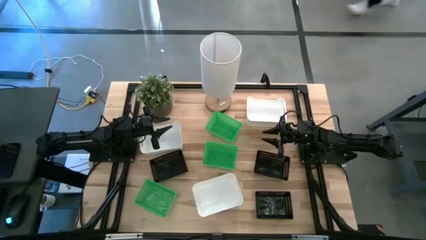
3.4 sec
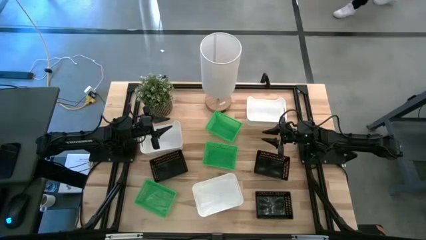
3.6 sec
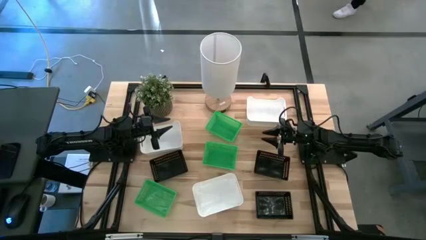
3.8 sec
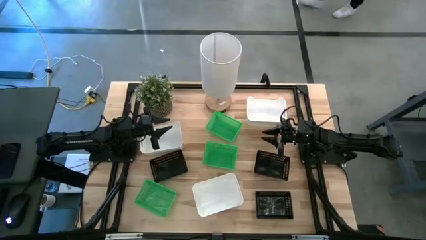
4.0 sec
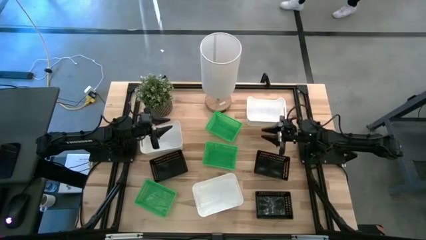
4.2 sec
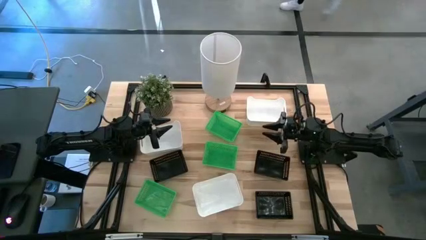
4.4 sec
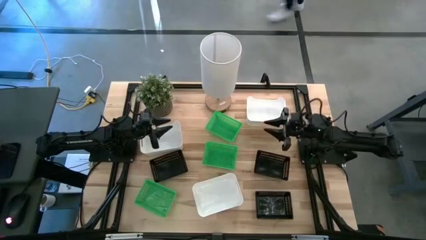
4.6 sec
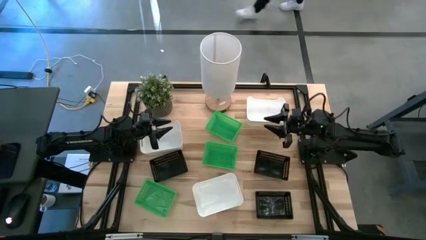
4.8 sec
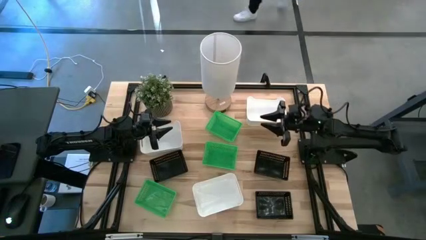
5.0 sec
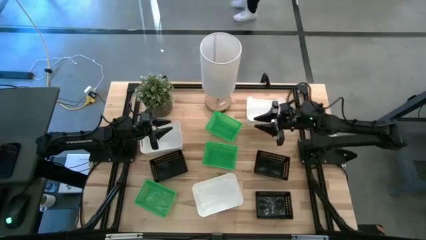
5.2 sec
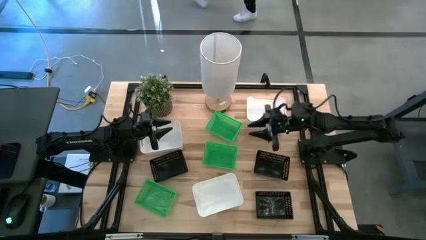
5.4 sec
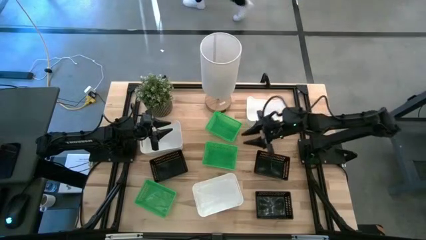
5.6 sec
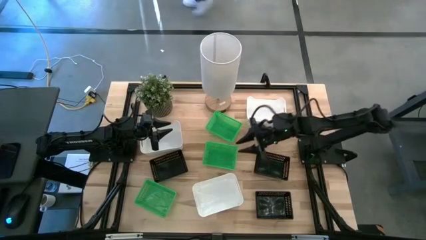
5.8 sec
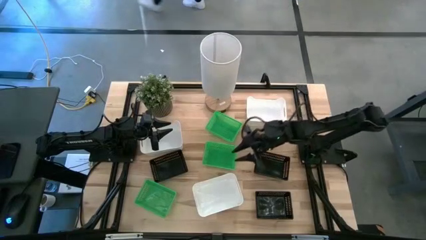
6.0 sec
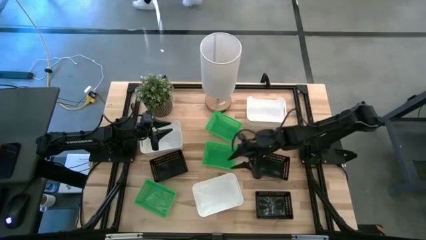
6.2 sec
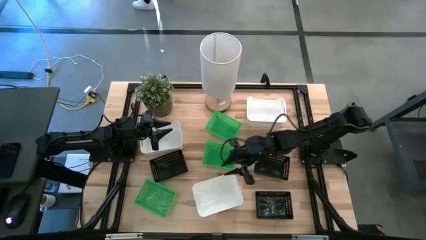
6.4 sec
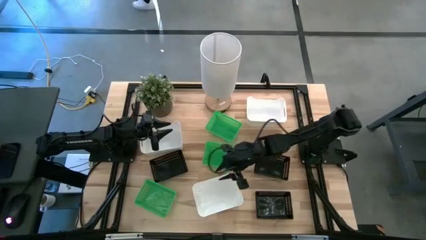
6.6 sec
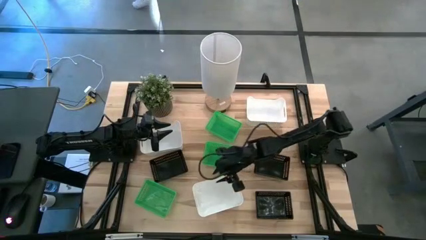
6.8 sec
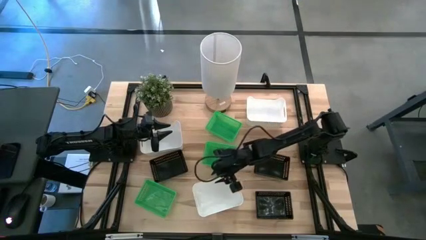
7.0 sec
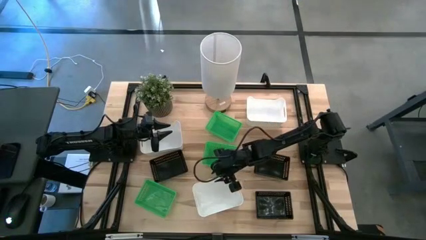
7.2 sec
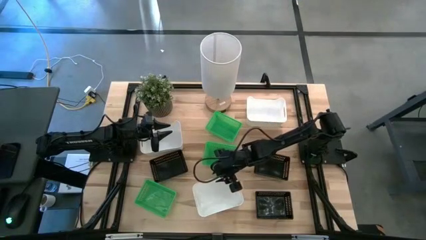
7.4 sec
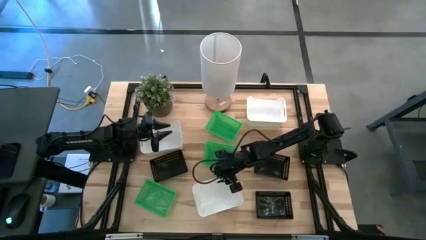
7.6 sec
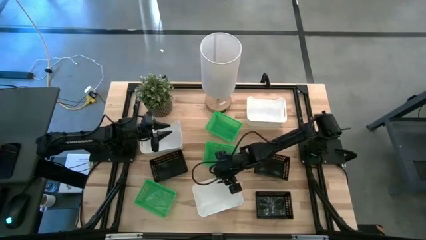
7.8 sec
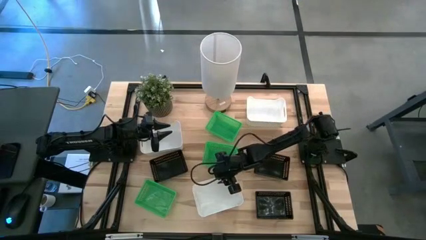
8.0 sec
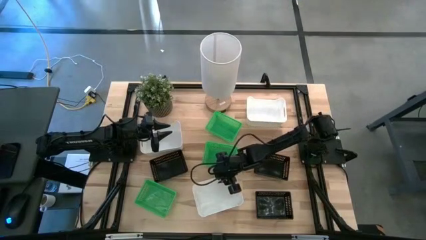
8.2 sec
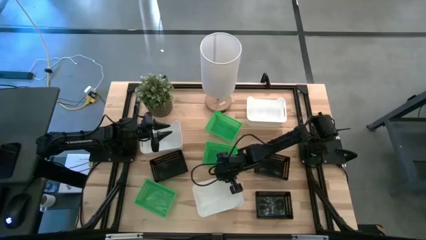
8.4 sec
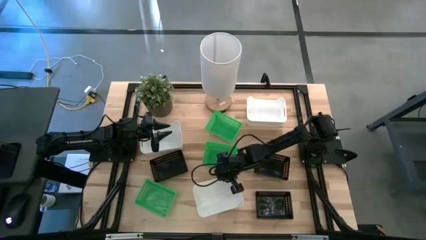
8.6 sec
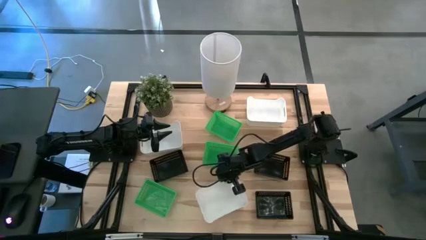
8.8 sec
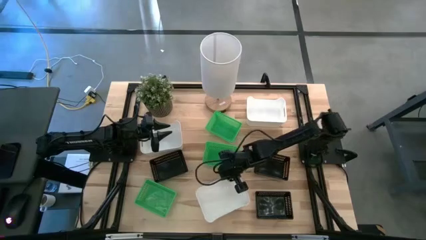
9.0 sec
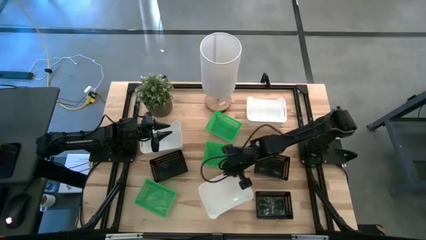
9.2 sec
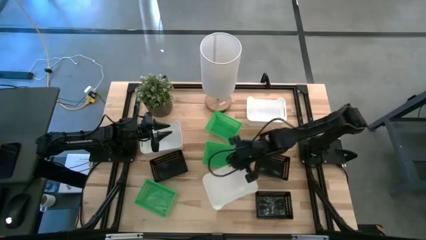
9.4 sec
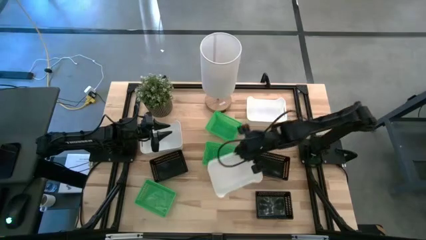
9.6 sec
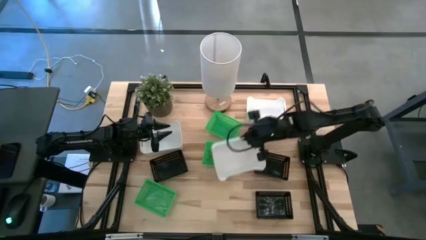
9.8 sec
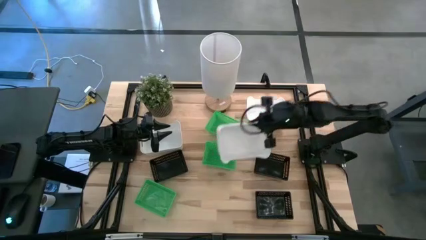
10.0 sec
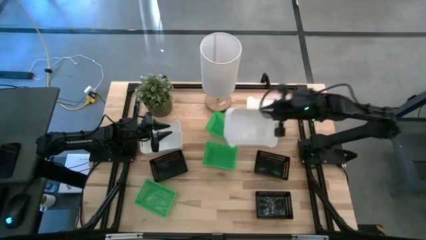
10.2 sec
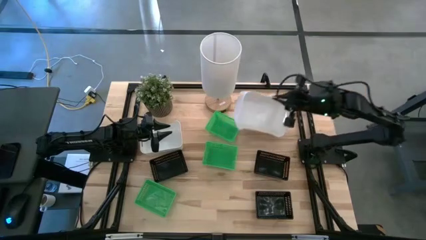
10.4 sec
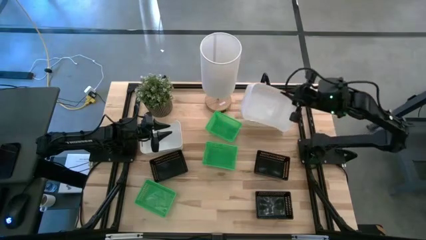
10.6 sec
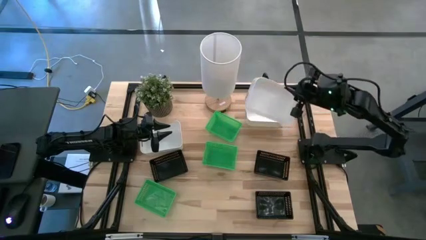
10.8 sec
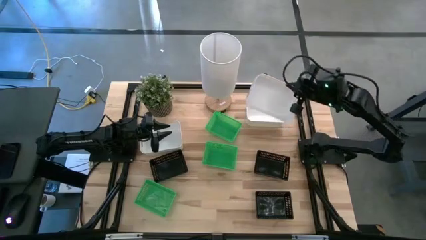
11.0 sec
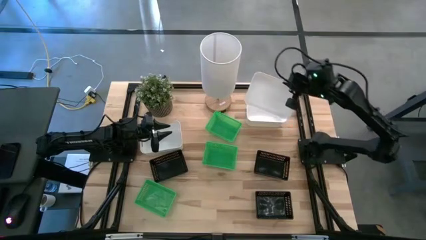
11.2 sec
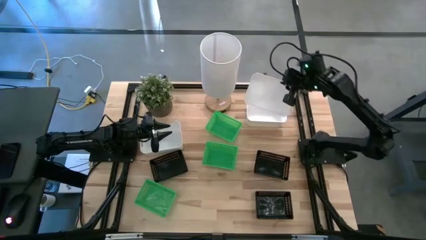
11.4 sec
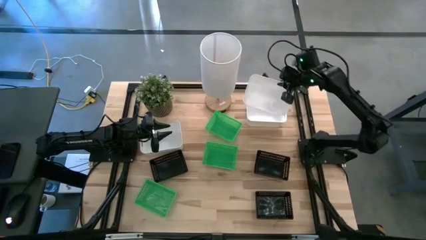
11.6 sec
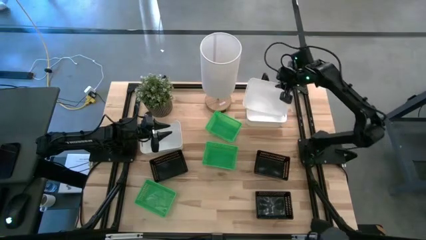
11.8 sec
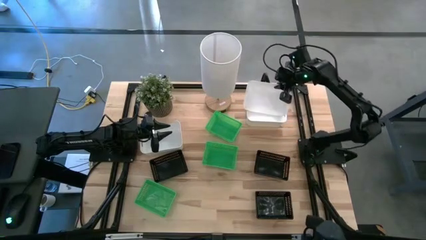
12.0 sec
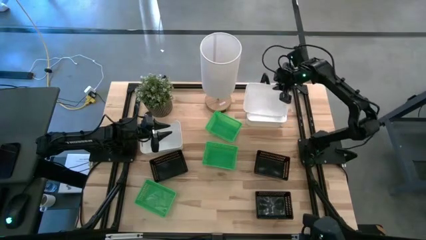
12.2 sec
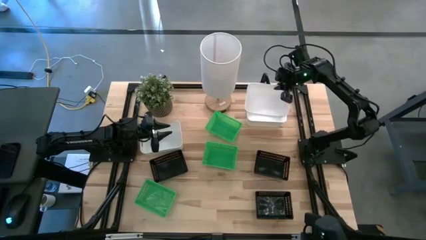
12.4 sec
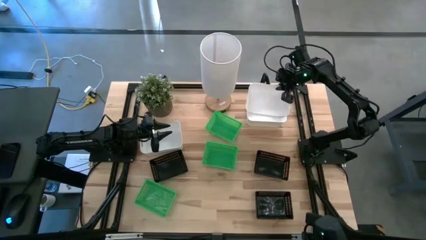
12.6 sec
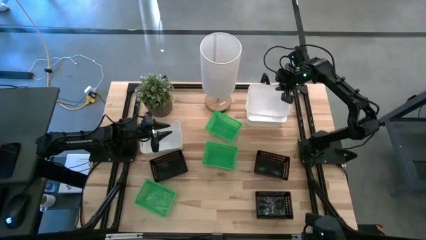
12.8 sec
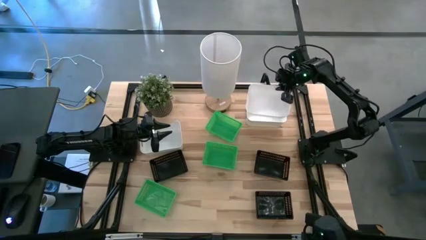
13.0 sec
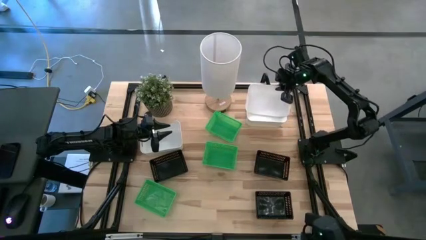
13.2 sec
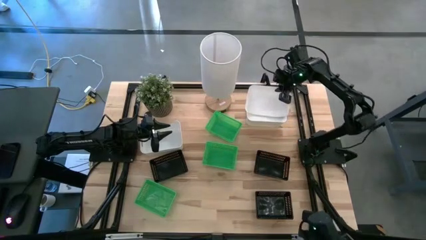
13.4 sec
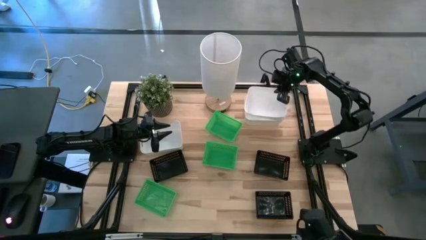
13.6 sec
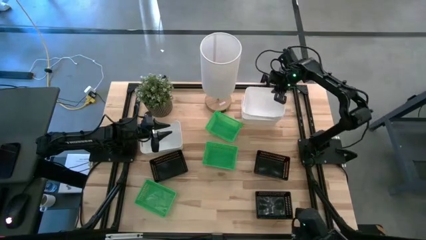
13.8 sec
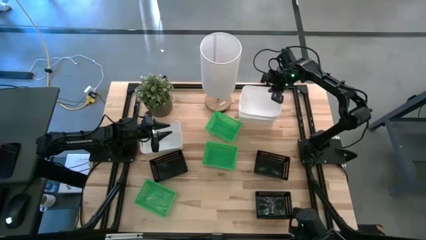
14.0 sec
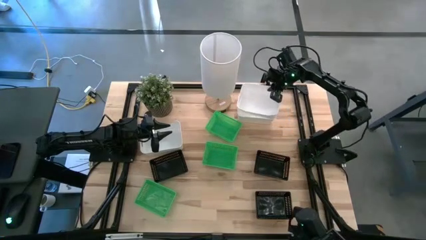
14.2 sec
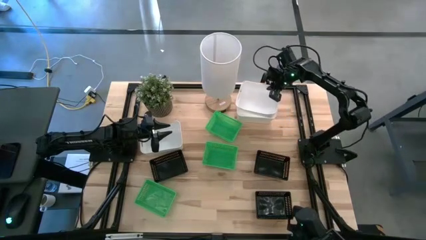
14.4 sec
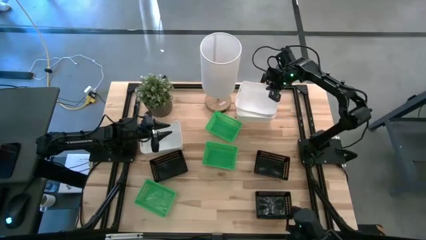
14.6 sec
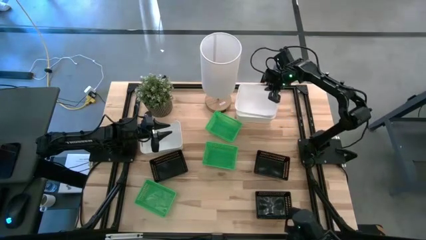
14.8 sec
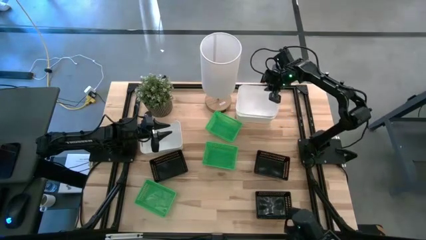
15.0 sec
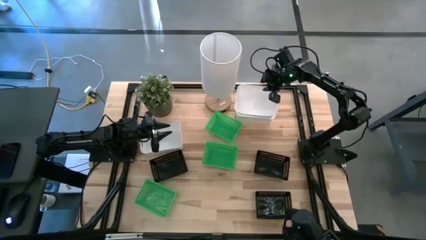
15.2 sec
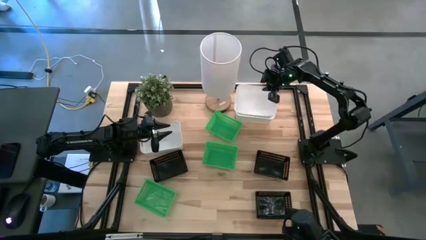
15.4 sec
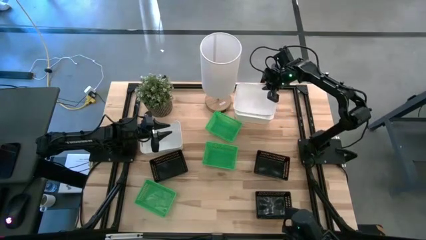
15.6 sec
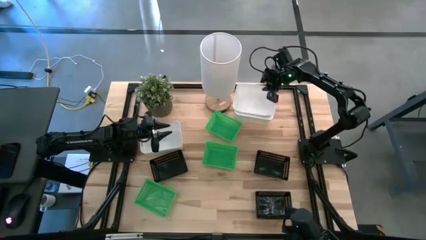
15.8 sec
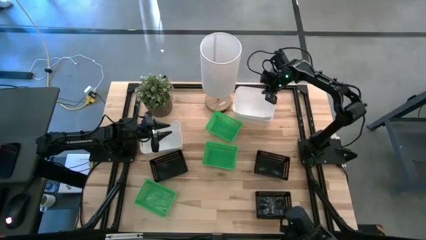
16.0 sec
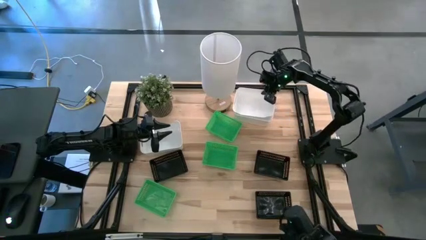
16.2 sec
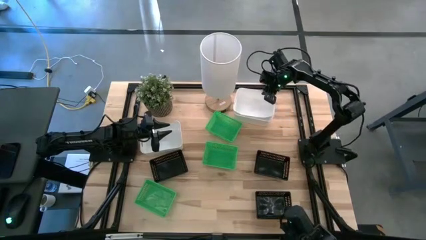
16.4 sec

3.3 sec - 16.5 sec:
Stack the bottom white bin on top of the top white bin
